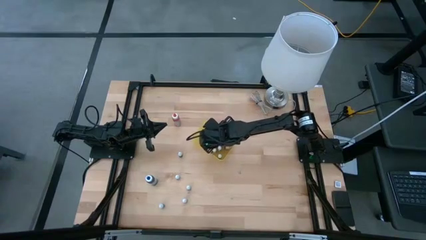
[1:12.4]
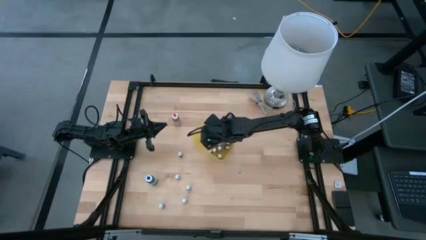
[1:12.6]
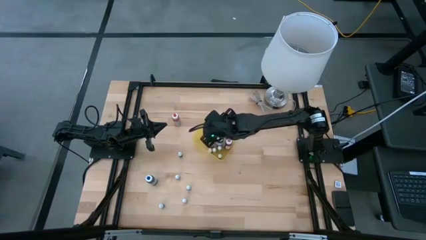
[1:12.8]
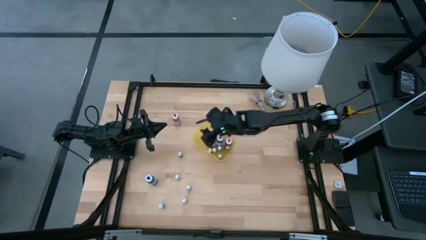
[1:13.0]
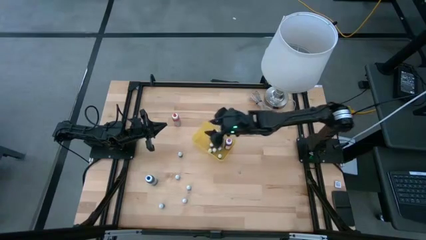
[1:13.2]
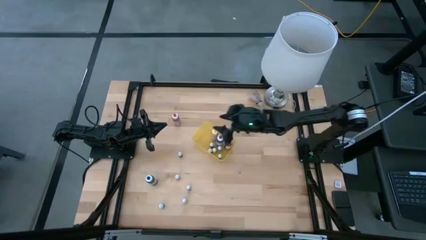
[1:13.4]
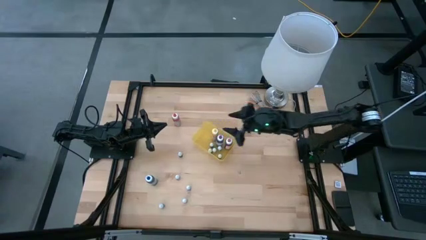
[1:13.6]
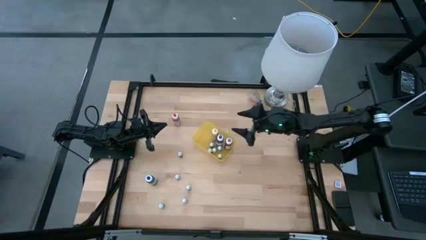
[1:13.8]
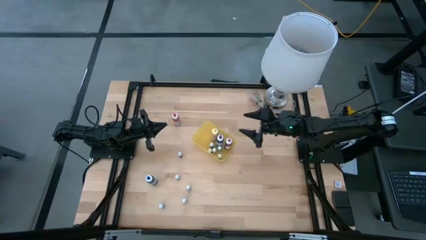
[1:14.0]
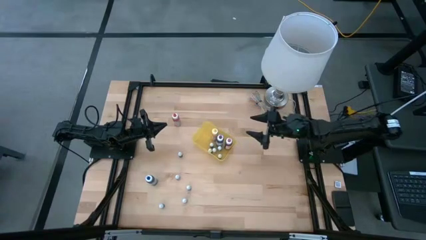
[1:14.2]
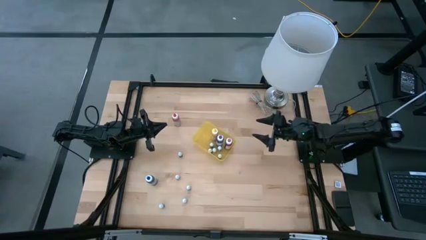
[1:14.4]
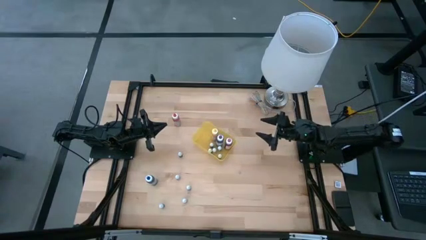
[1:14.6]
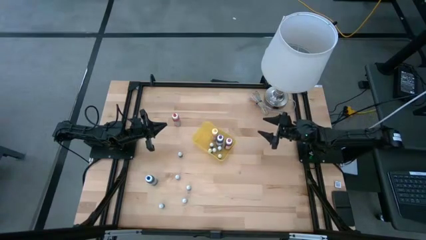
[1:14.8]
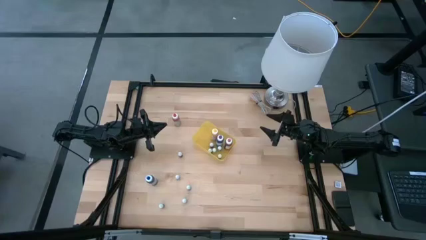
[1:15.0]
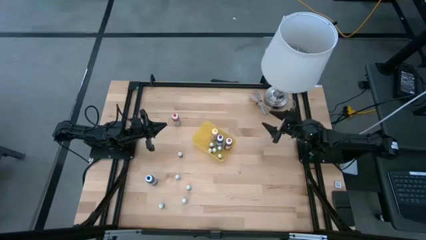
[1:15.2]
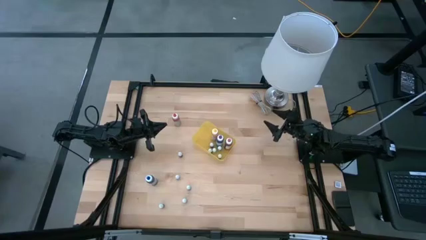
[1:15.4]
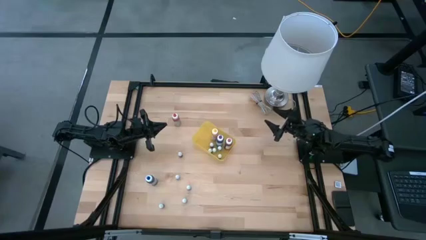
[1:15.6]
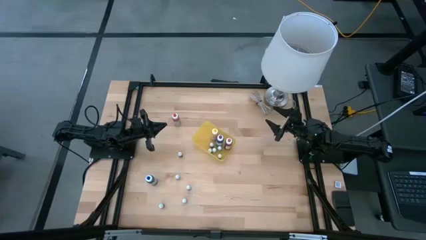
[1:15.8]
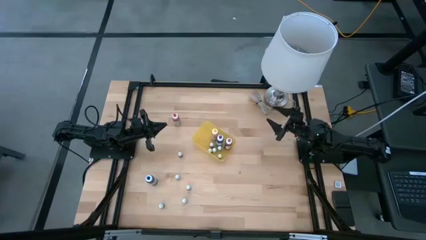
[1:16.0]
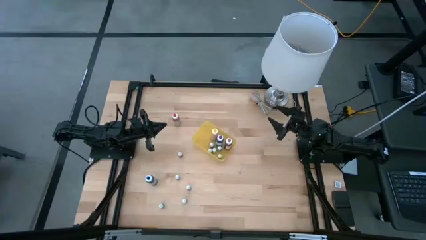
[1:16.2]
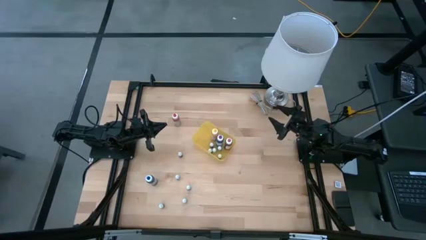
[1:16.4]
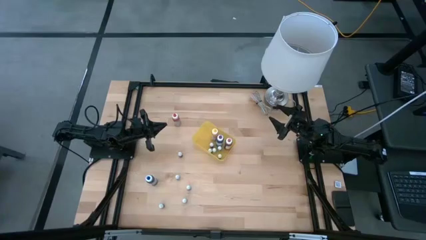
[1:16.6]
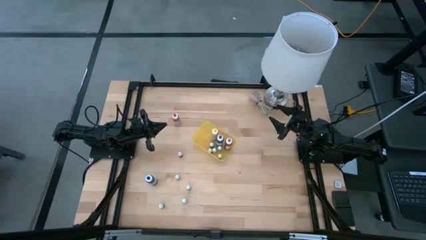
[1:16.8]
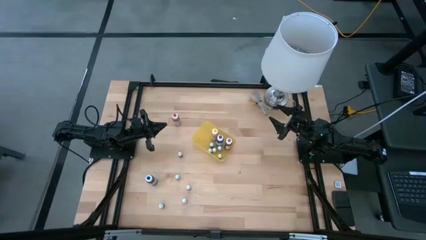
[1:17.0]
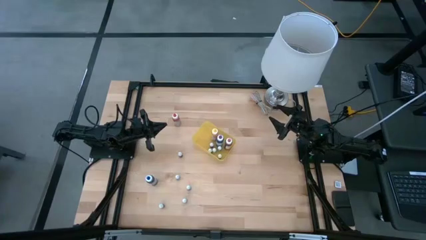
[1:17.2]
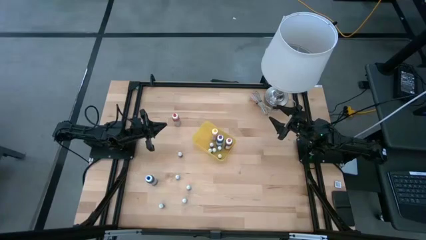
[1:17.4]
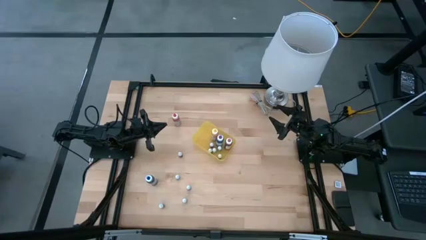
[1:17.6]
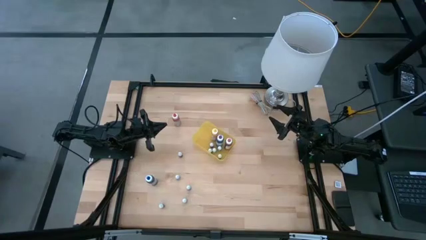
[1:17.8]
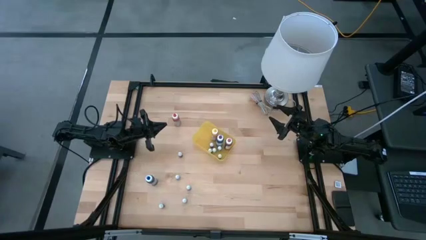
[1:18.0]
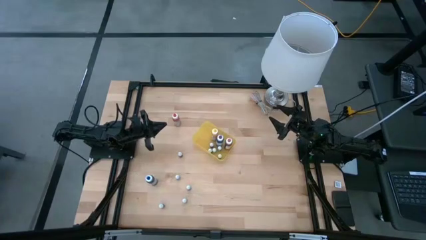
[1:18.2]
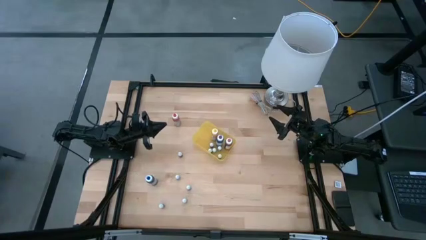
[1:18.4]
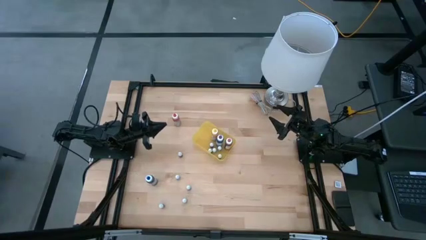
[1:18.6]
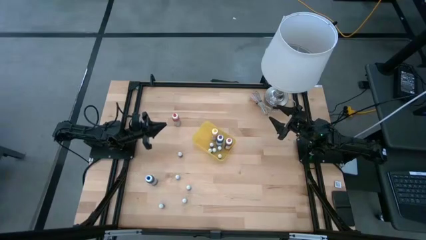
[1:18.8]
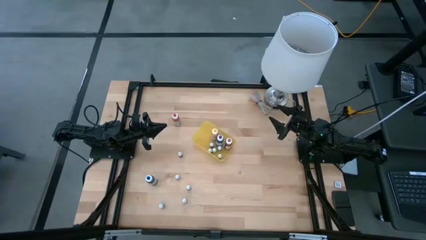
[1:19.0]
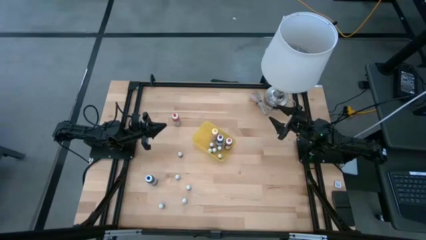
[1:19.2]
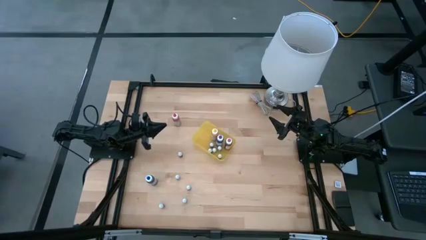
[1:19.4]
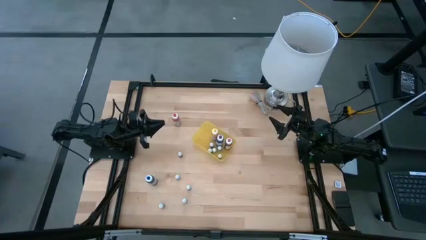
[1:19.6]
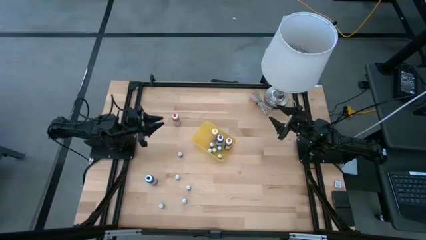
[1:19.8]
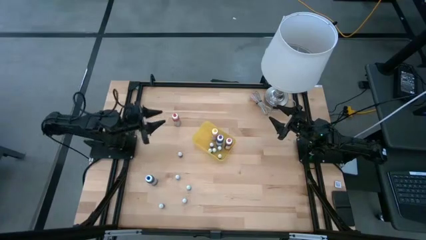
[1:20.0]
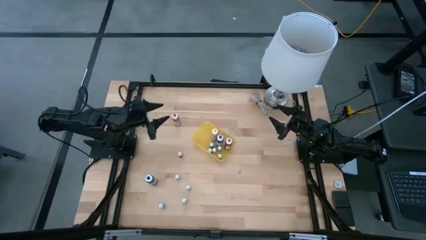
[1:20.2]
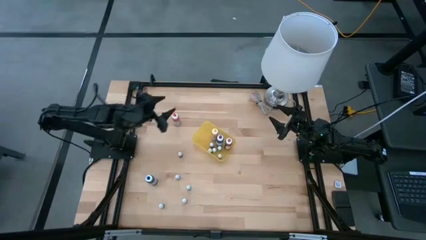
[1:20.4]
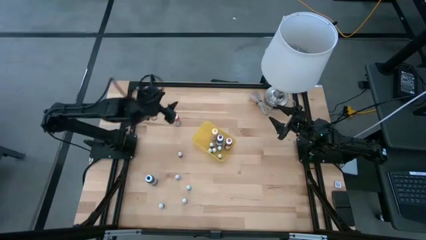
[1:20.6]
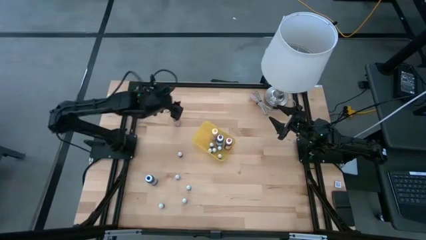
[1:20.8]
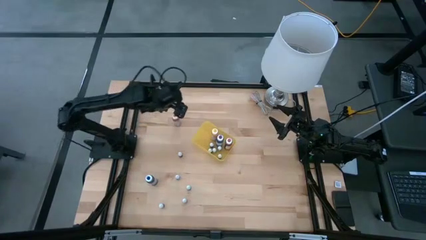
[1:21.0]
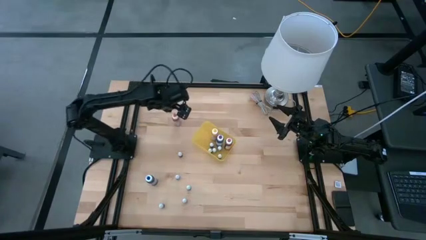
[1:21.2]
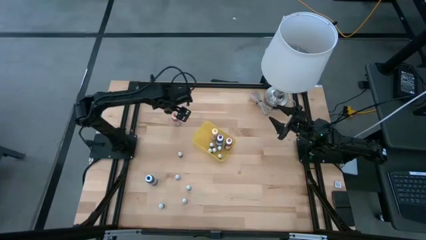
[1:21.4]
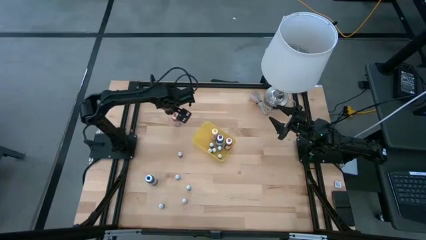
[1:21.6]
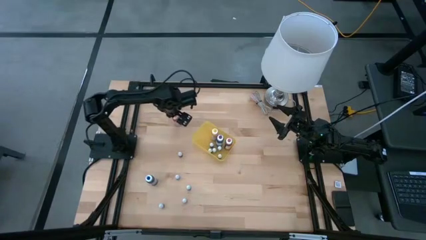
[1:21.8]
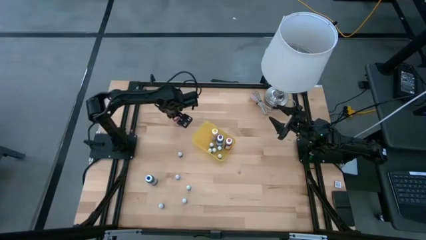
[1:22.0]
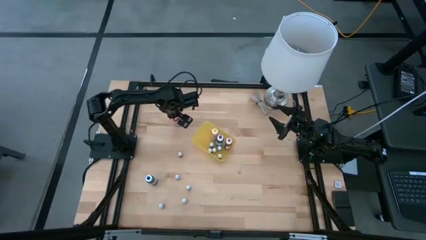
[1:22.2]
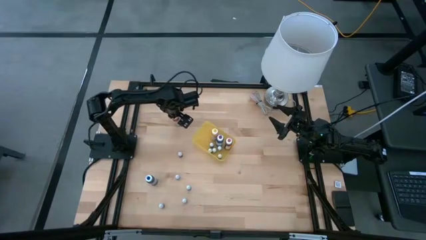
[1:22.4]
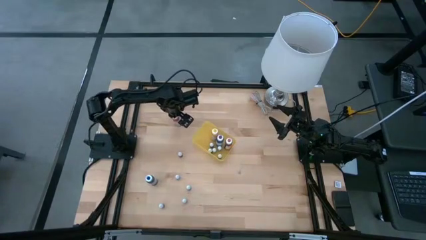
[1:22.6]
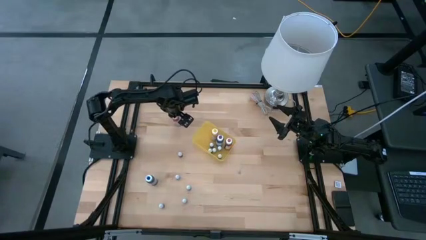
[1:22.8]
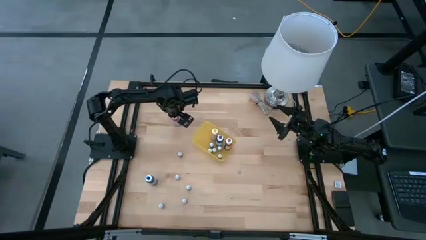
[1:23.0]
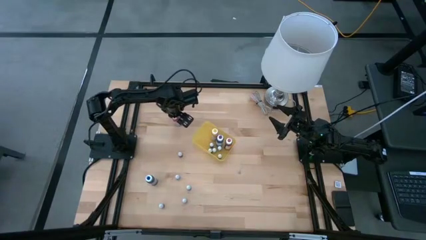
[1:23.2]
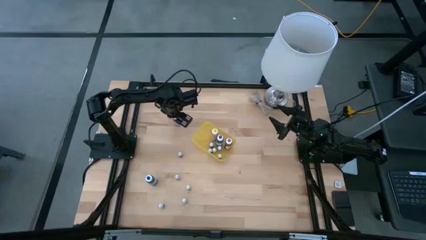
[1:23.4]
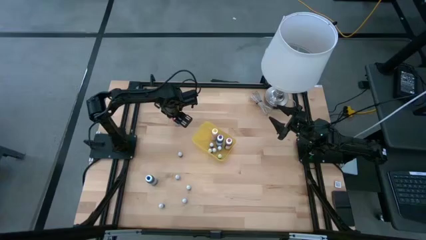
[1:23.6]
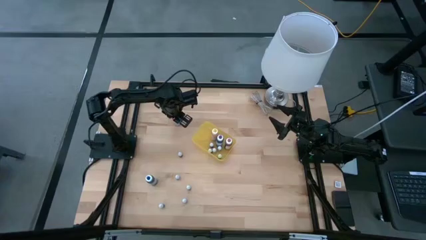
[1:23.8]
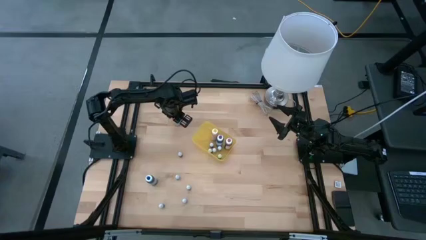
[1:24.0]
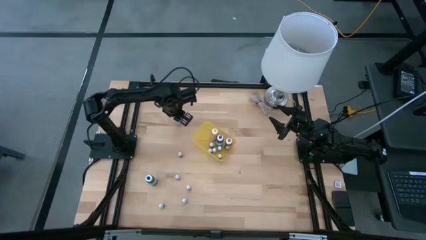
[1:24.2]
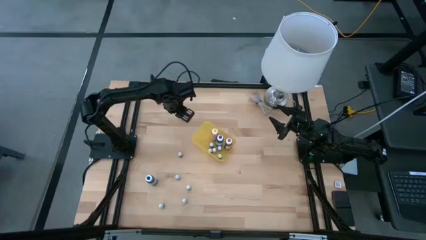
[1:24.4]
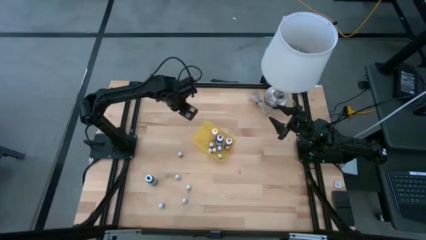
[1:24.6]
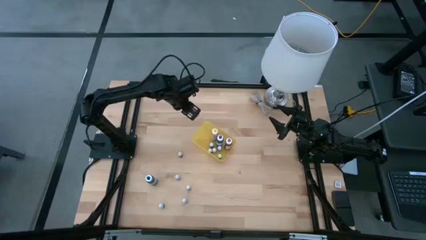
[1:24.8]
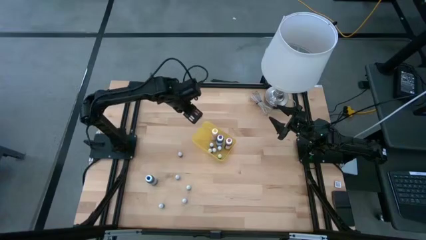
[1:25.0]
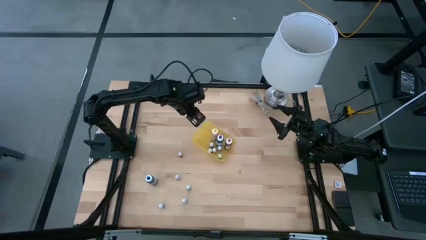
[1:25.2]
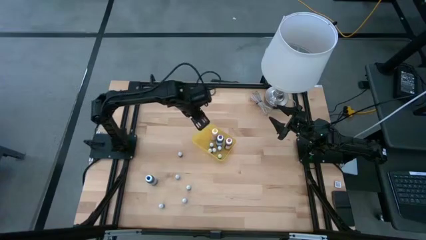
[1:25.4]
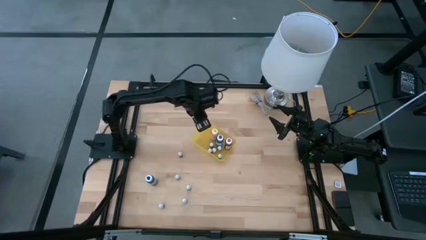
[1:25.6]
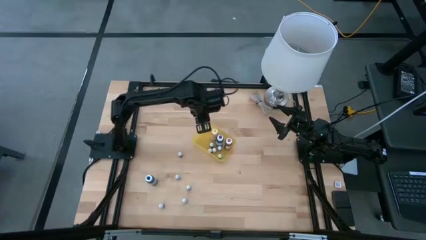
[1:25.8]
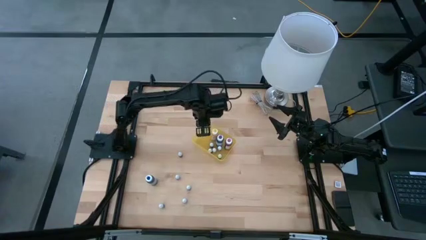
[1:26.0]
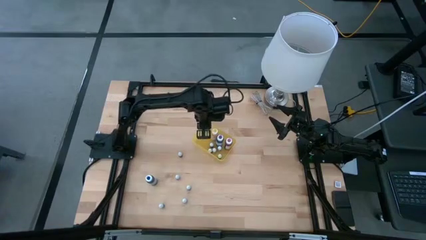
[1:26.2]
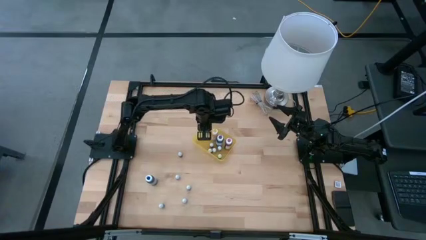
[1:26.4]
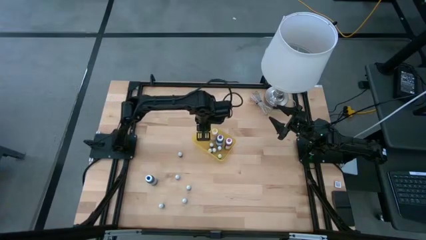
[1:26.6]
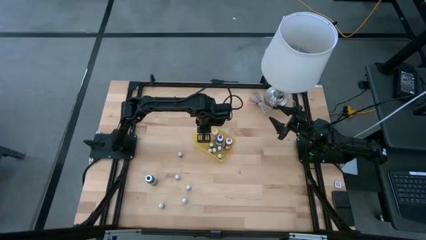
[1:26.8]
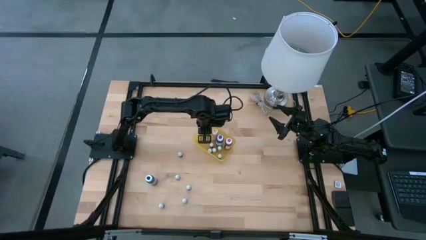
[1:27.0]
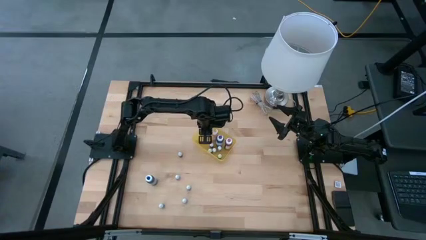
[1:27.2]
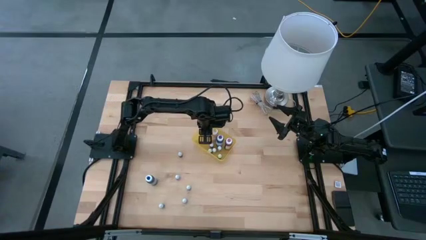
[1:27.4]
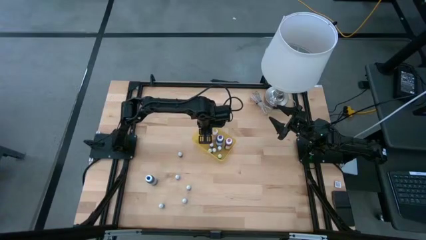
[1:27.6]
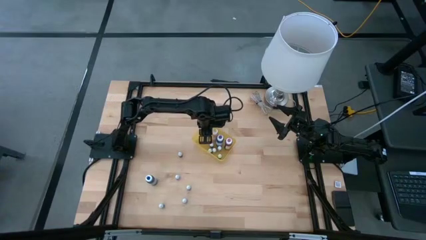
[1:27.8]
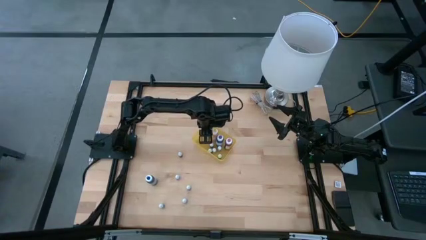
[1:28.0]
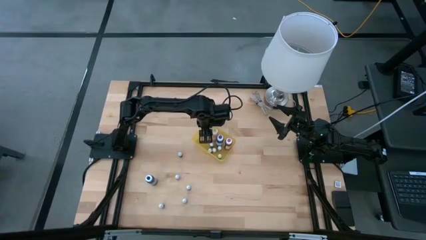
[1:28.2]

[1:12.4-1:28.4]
Task: Pick & Place food coloring
Put the large orange food coloring bottle into the yellow bin
